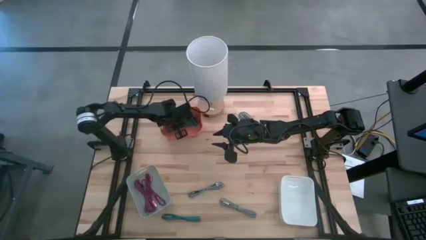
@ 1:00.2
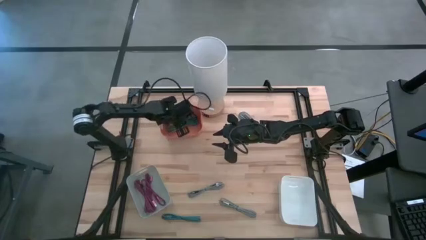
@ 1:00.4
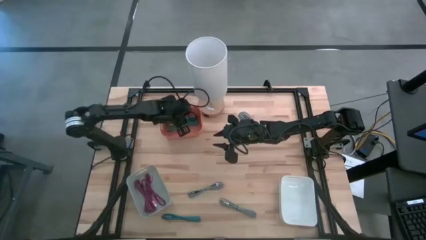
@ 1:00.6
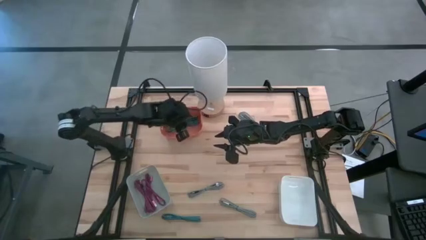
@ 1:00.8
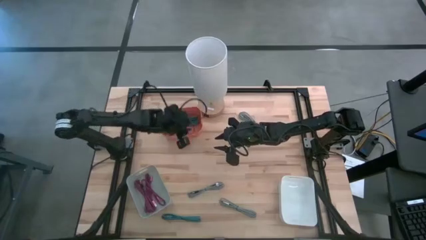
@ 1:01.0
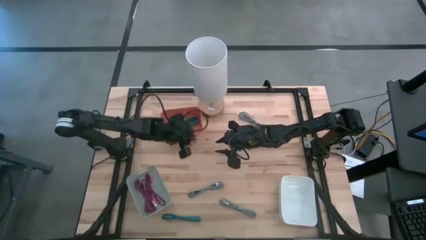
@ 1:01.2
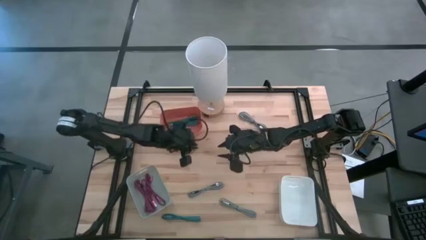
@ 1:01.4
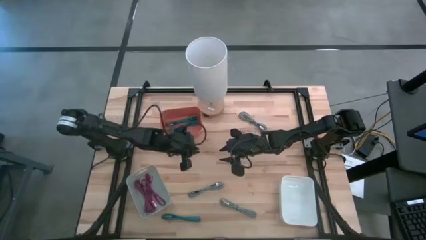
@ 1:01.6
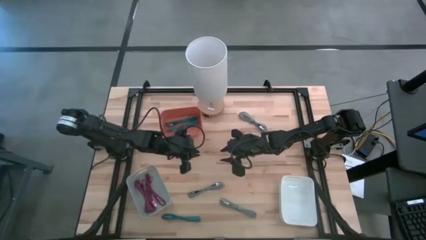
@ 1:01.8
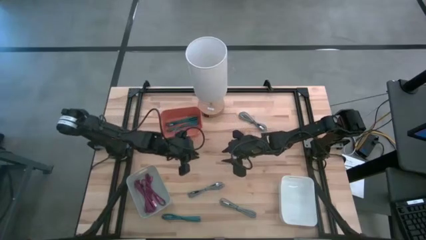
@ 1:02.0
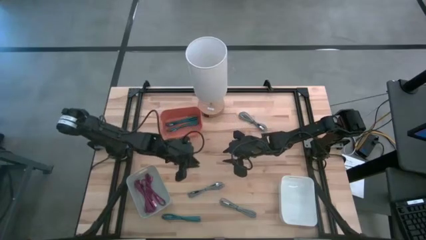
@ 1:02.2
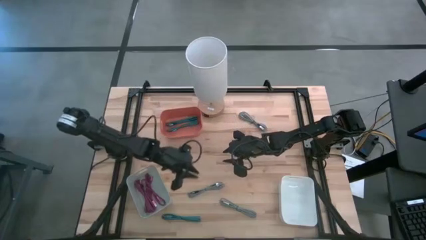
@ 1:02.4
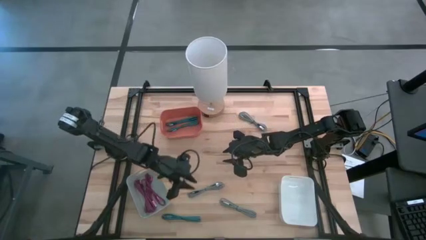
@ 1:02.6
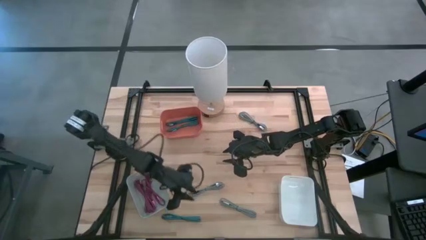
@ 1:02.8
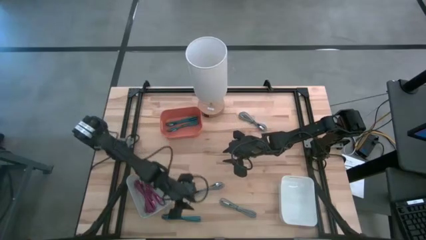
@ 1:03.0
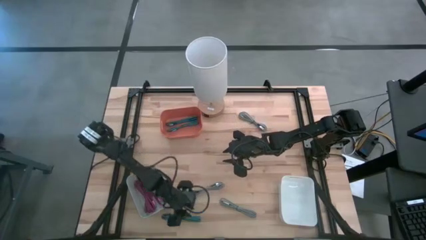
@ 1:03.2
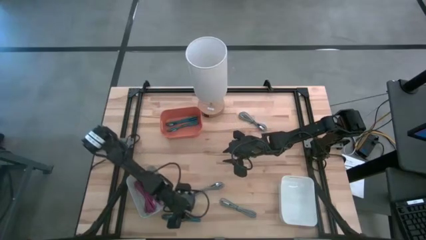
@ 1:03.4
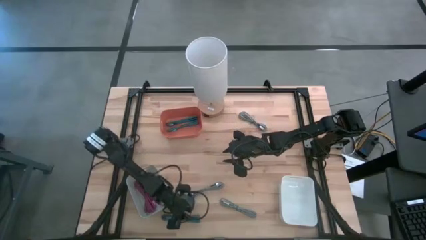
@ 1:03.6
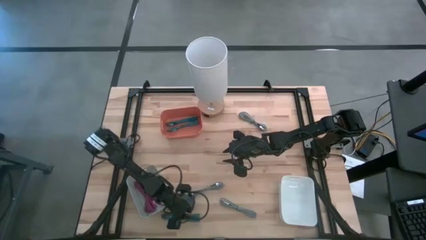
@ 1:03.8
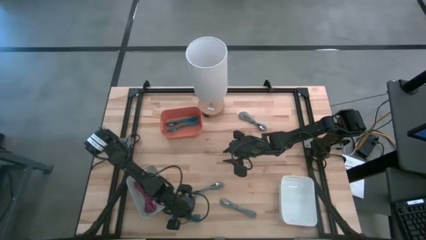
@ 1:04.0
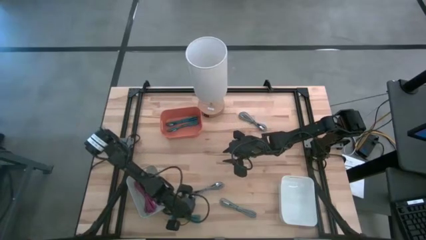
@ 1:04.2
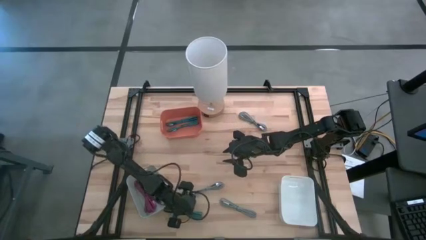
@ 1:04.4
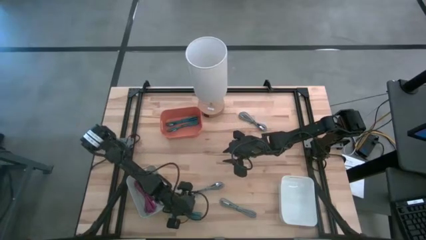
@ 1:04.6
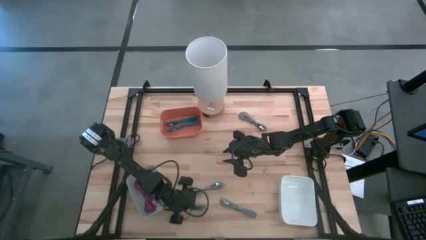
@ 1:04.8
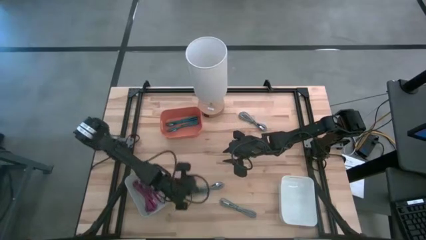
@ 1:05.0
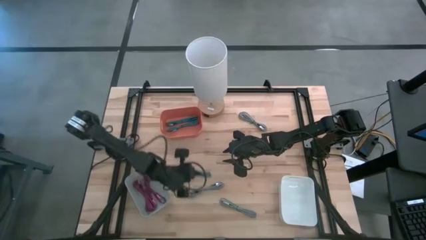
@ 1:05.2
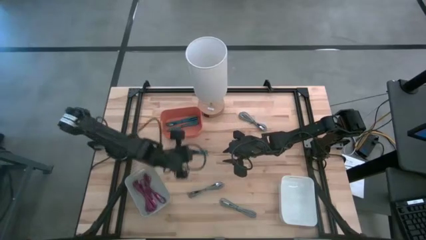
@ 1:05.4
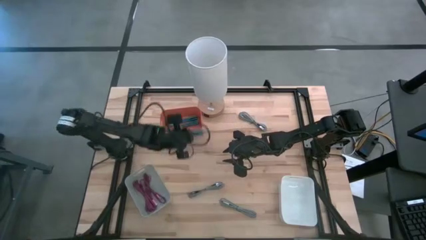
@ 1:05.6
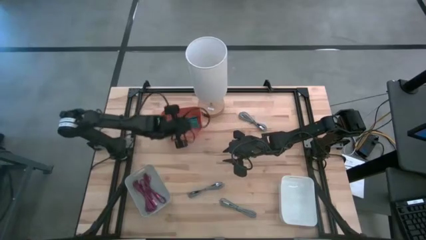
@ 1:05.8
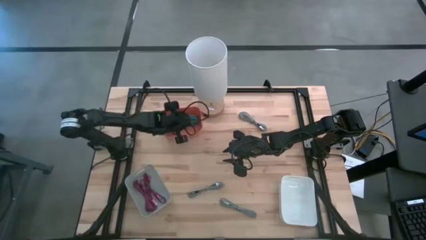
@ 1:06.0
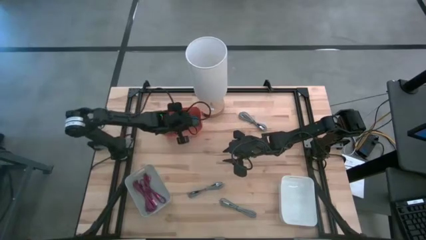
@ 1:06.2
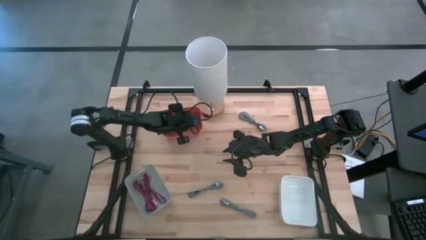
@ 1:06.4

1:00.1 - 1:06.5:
Task: Pick & Place USB Port
Put the blue charger cable into the orange bin

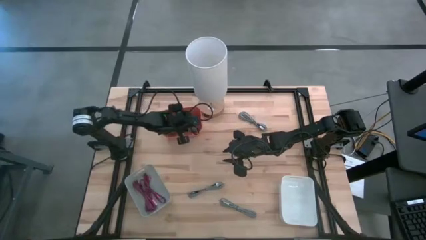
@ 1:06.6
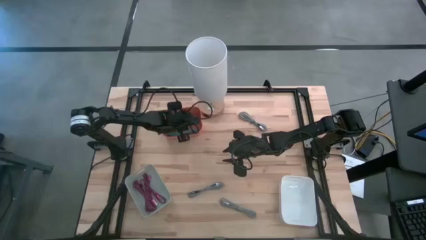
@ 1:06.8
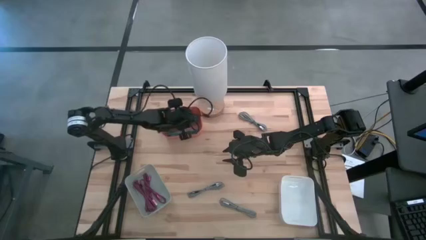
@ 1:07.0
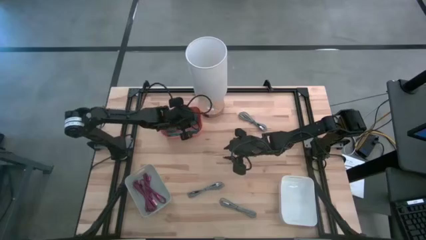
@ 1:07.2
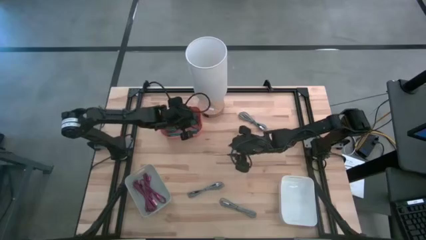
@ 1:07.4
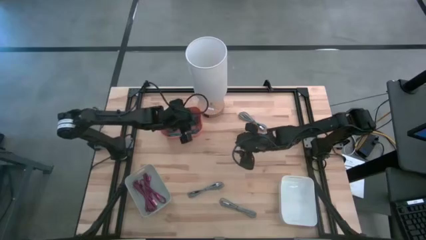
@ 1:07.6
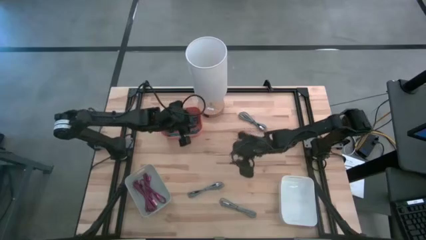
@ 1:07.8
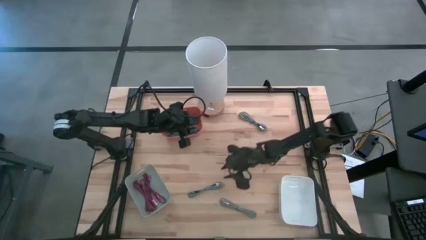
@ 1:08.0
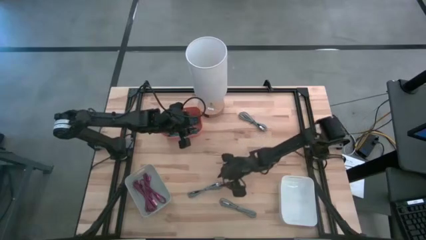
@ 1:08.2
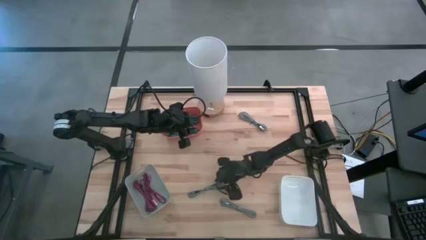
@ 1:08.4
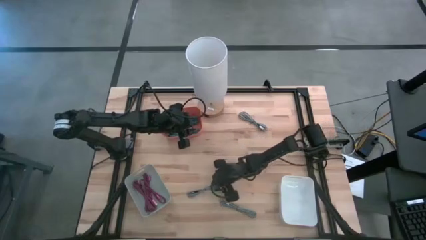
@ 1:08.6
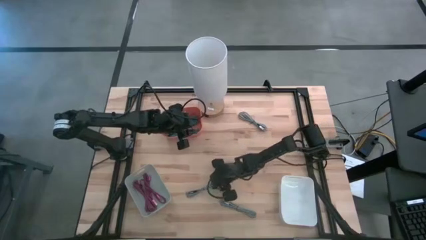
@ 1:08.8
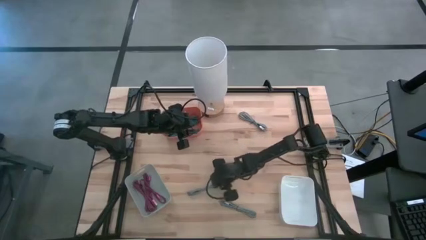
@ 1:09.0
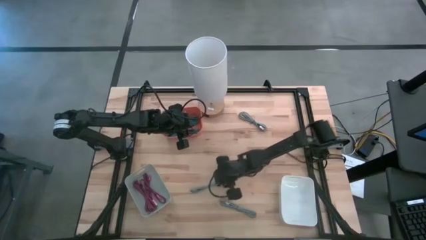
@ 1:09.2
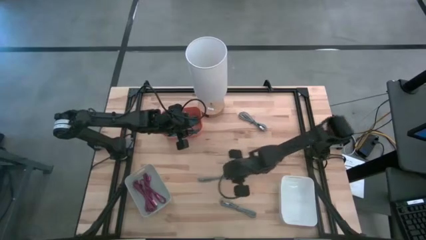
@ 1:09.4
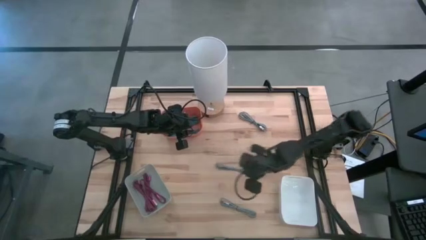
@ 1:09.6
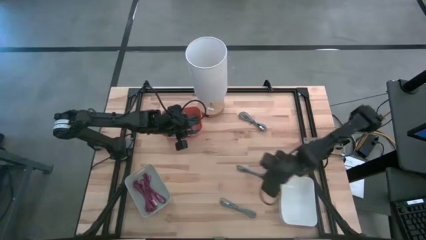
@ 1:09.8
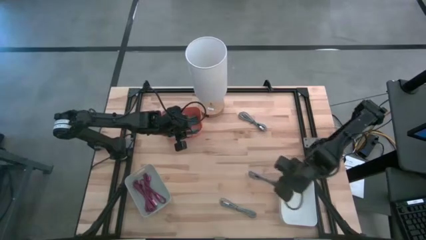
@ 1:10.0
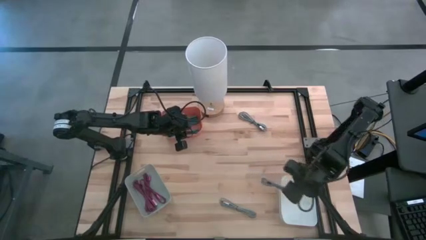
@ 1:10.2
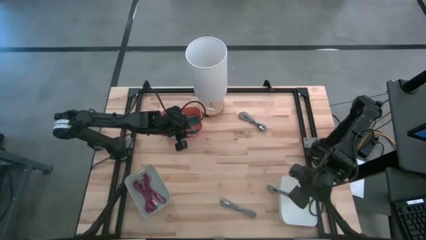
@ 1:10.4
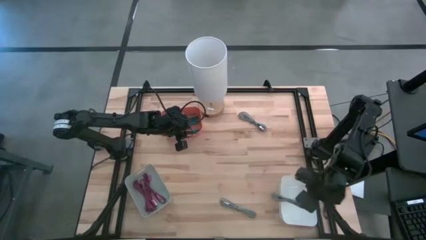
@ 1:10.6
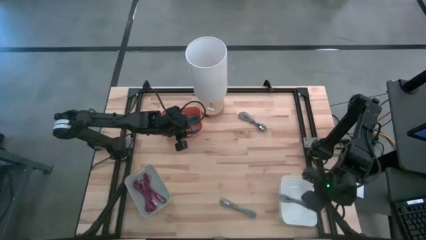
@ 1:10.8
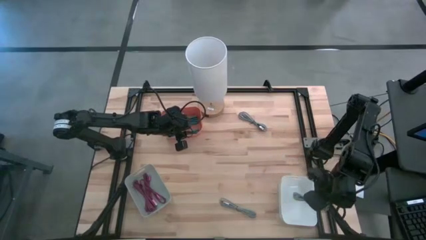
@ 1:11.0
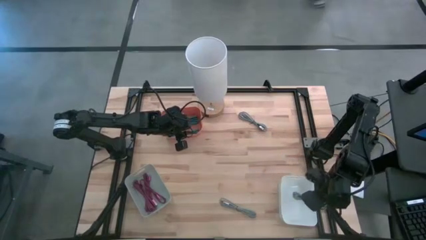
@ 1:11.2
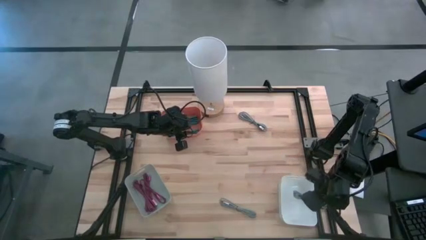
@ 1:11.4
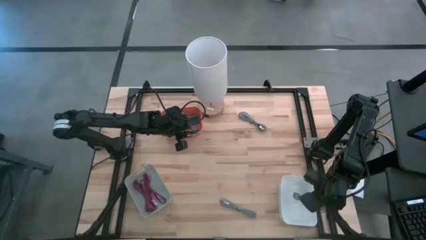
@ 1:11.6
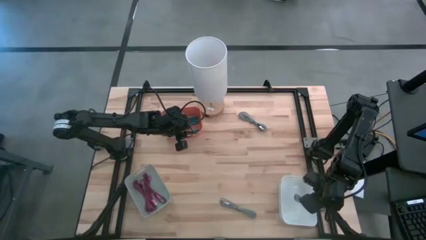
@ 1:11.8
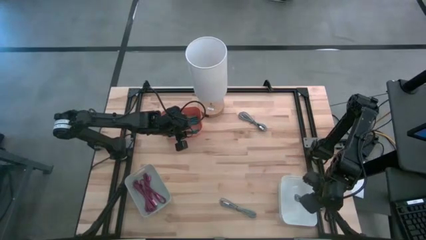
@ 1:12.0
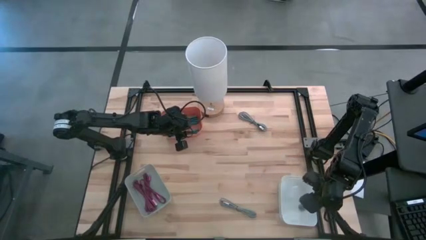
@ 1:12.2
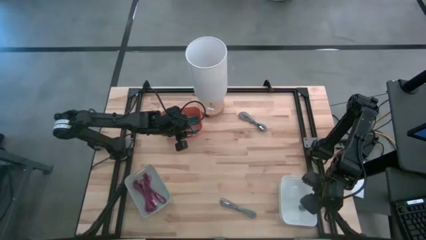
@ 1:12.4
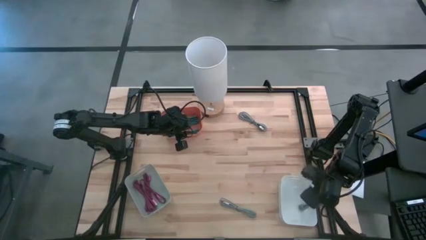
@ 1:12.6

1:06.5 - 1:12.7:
Put the bottom left white charger cable into the white bin

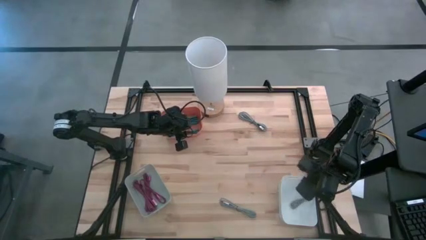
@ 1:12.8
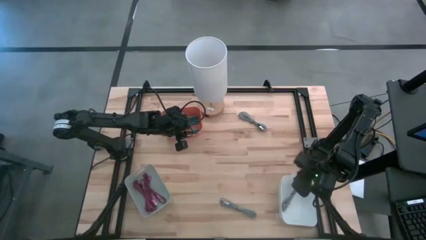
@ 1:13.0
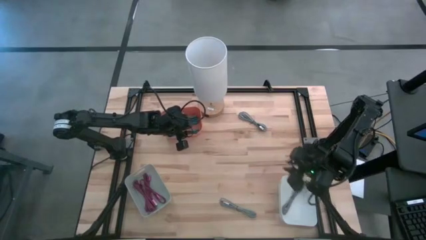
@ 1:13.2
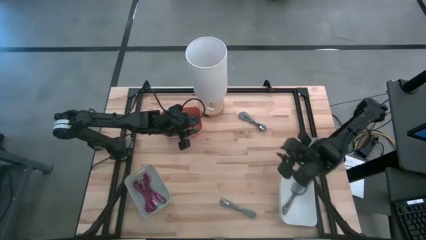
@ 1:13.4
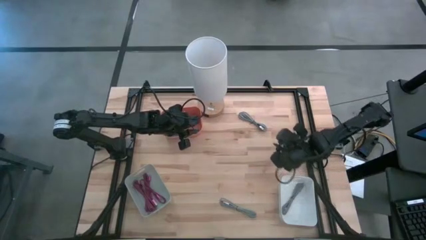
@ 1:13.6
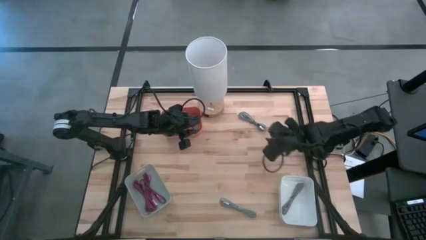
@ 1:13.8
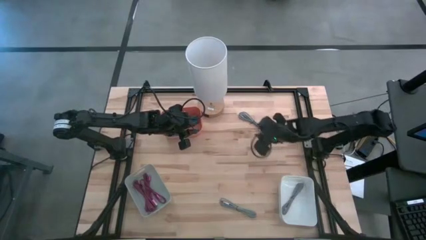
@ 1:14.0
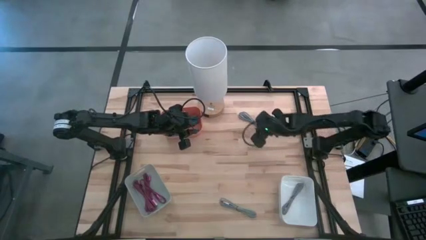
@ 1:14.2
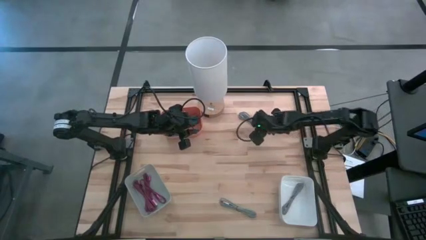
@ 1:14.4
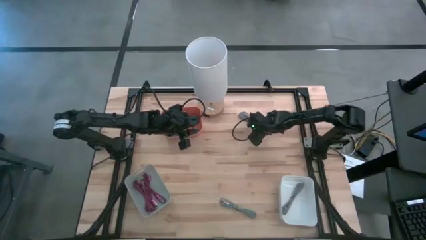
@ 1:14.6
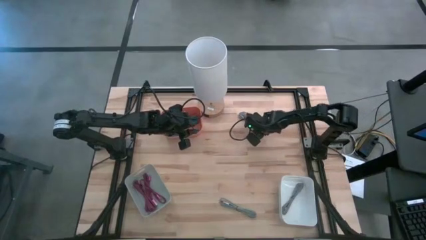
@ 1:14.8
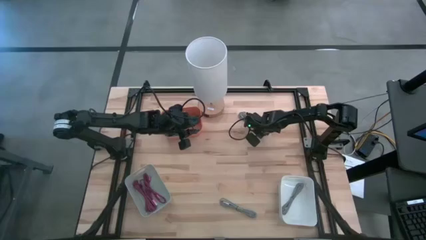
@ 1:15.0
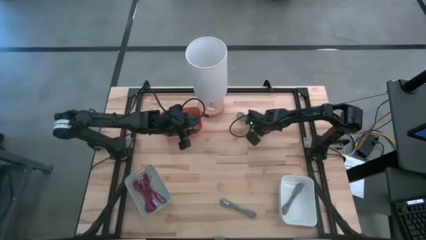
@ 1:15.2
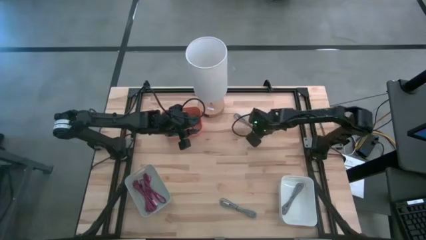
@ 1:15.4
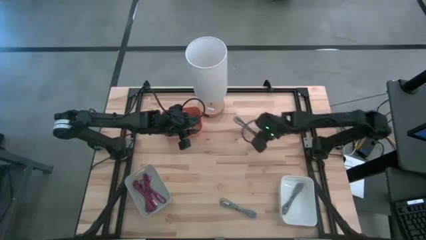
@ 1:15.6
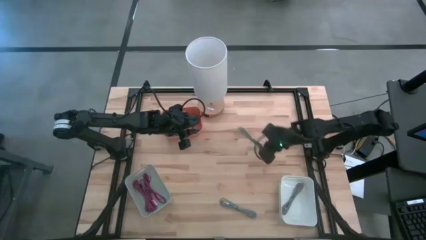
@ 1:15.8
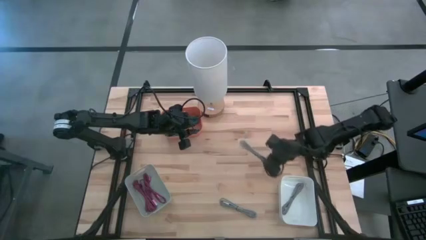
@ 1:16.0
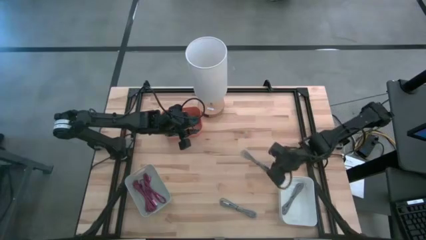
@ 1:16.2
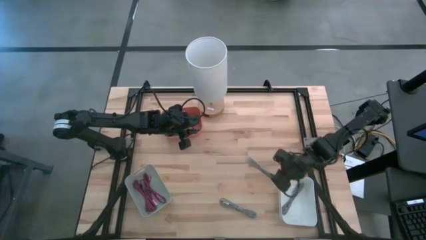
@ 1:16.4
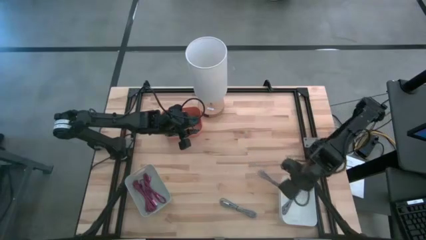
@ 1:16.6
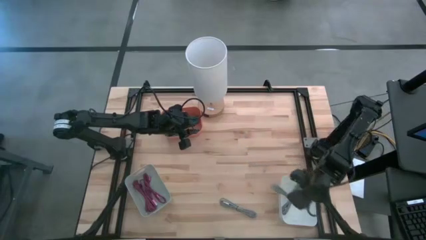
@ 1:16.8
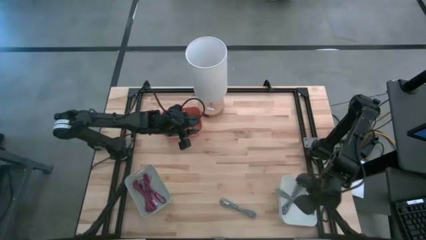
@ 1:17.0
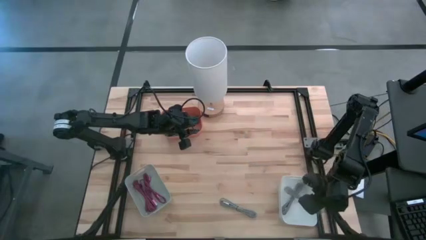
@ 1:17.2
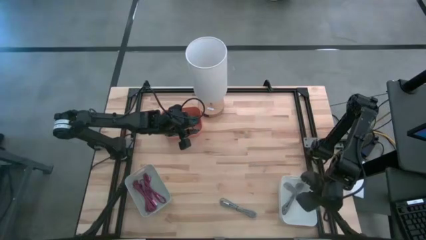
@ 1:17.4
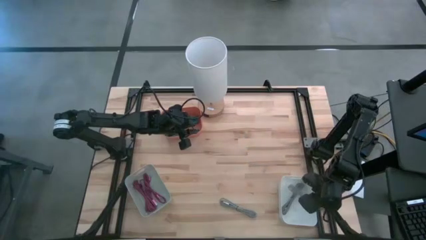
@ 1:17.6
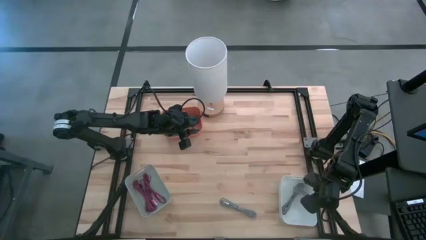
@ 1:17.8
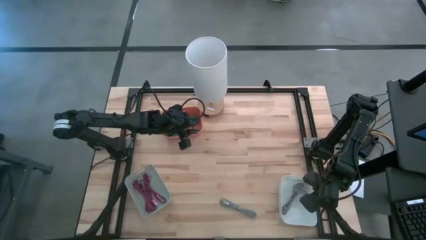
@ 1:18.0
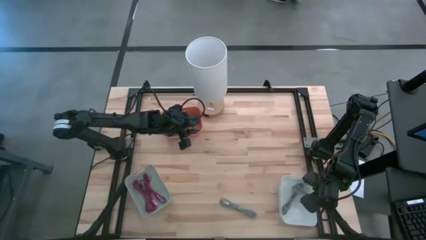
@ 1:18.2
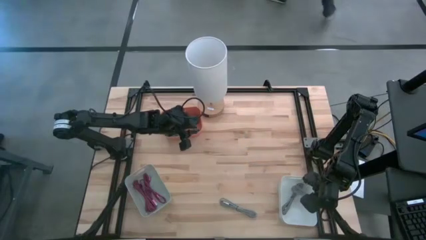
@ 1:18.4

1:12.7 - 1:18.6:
Put the top white charger cable into the white bin
